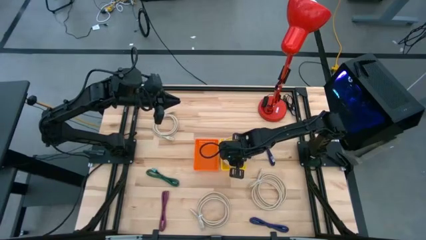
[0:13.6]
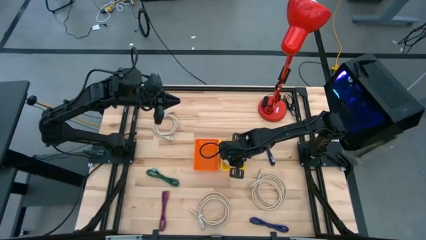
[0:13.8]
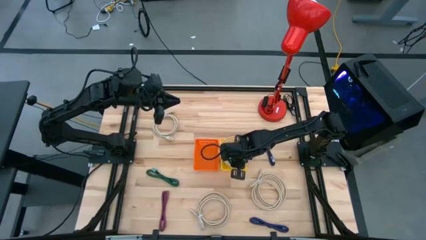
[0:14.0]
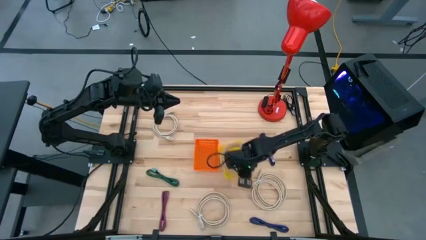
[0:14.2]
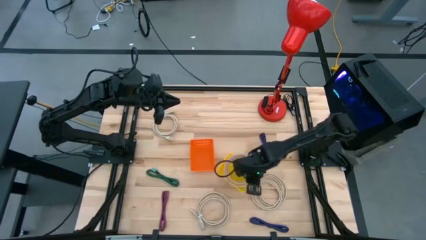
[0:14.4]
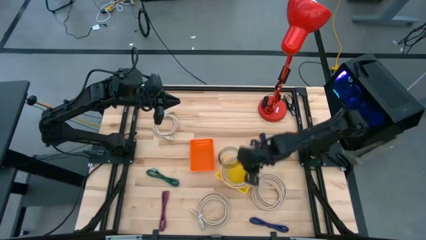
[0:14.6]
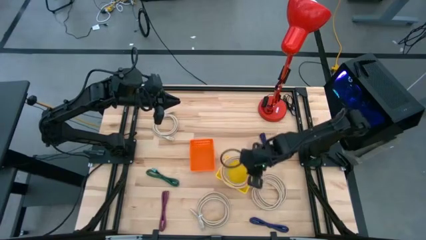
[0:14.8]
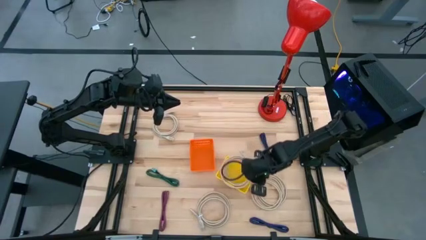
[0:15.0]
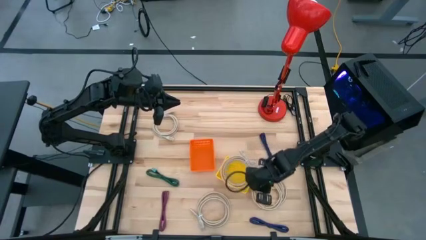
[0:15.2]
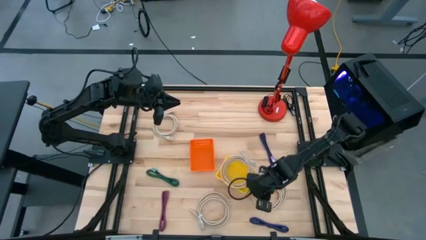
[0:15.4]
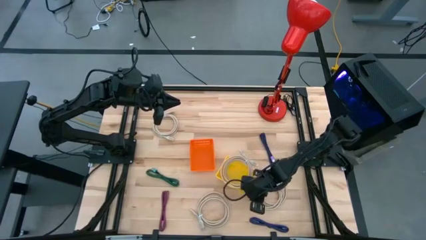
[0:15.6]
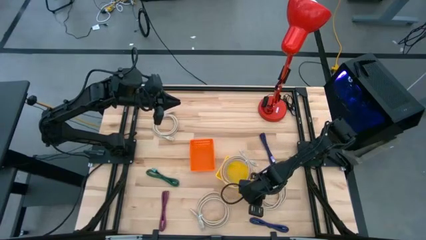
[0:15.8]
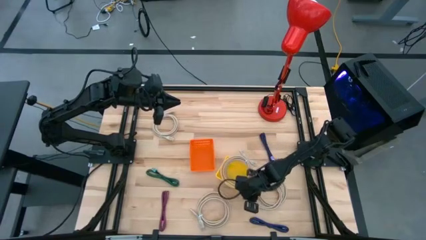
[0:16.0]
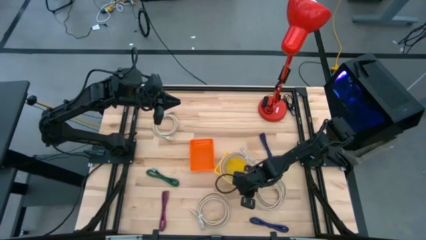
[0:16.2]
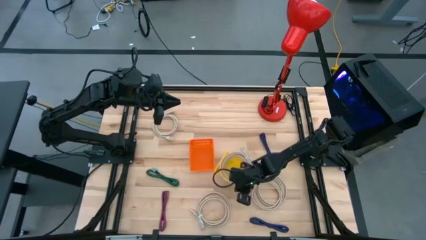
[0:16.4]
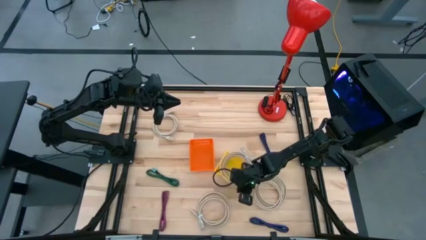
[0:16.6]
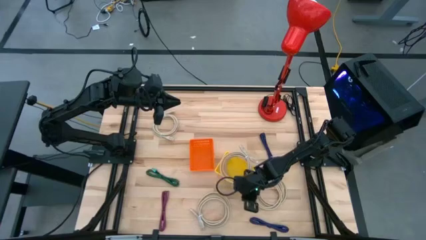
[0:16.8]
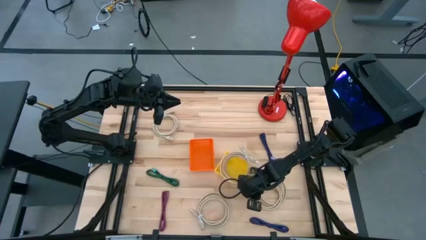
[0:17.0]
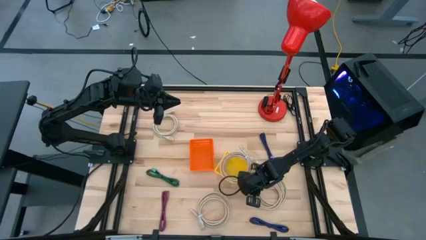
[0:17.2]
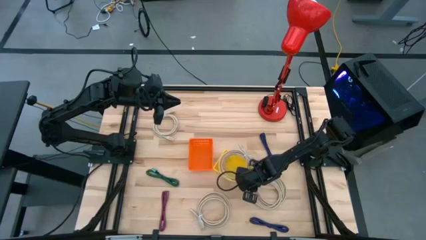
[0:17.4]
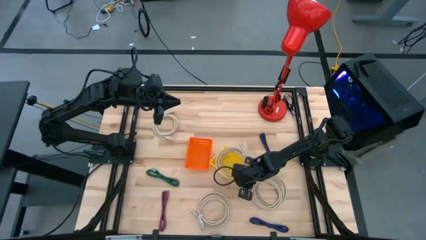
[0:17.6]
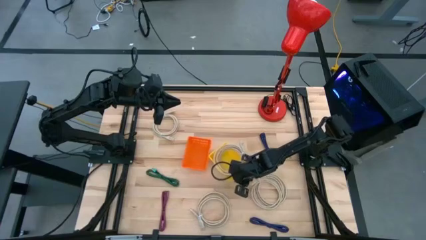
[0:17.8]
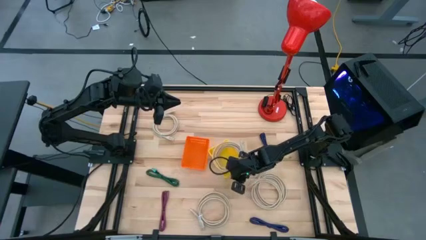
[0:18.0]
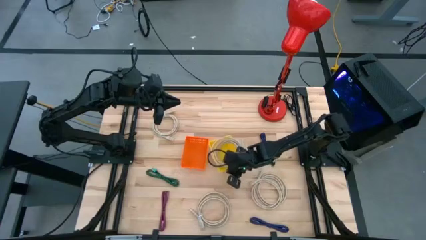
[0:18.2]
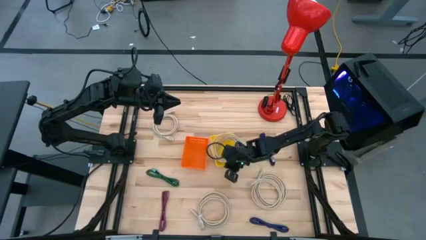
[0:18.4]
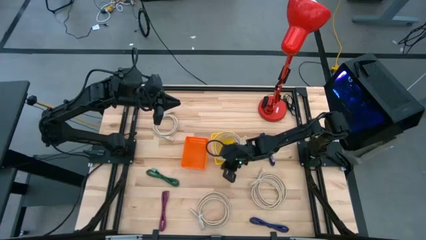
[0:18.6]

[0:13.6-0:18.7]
Task: Pick & Place USB Port
Adjust the yellow bin

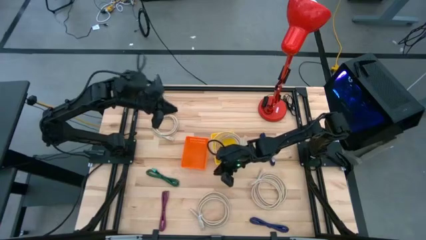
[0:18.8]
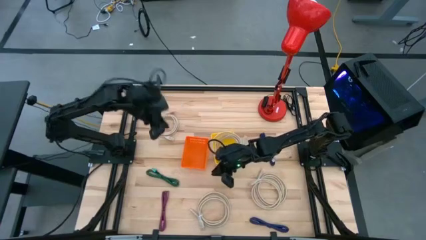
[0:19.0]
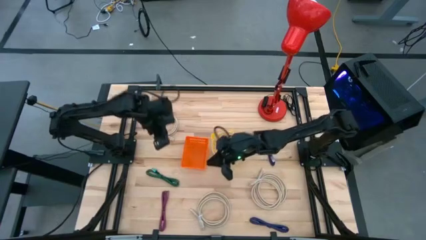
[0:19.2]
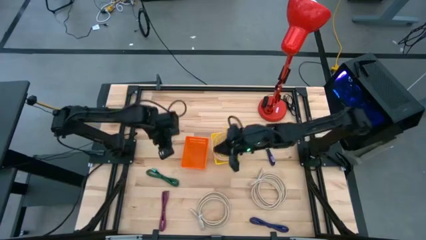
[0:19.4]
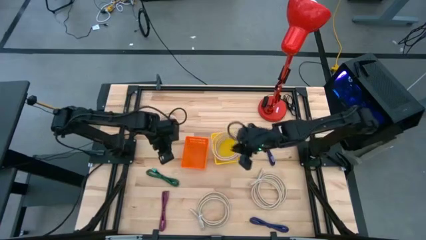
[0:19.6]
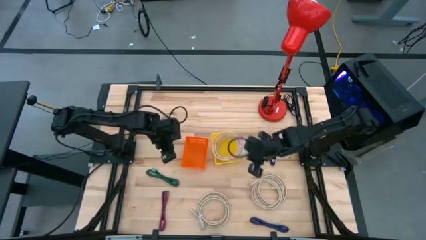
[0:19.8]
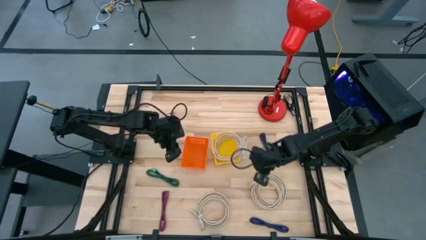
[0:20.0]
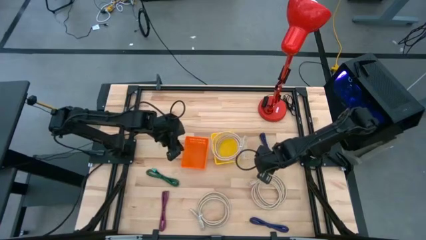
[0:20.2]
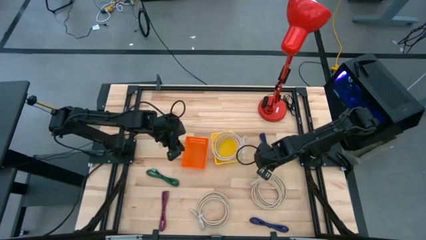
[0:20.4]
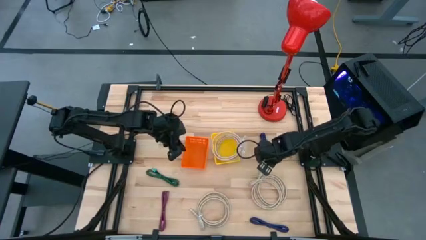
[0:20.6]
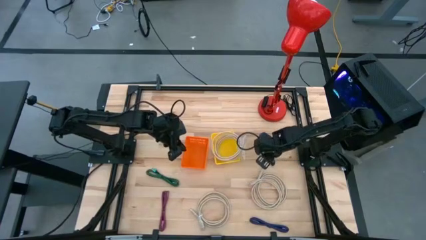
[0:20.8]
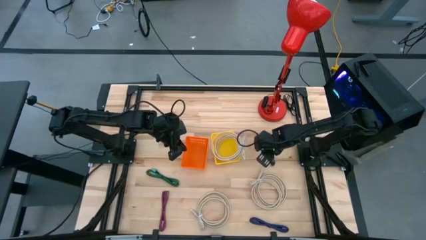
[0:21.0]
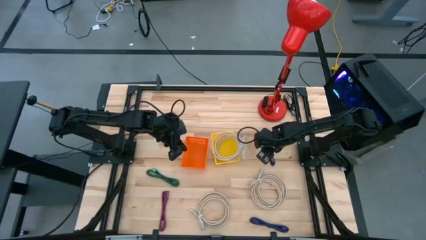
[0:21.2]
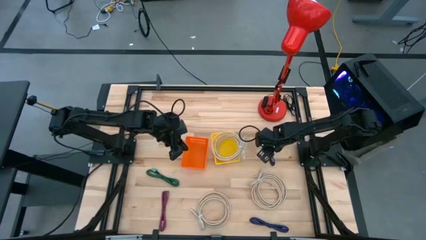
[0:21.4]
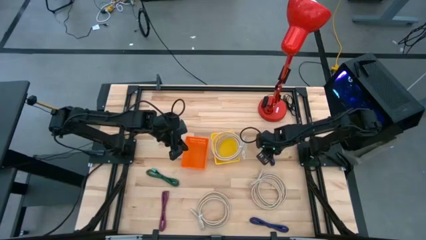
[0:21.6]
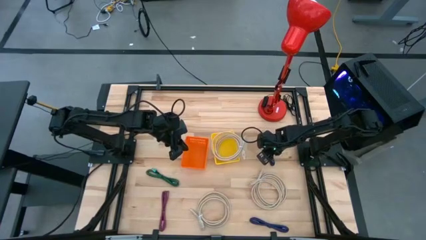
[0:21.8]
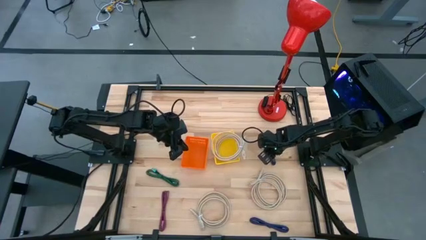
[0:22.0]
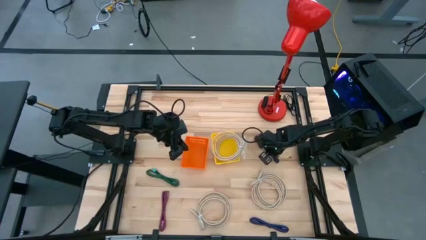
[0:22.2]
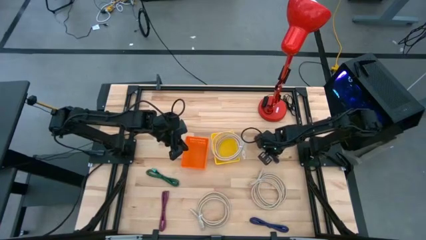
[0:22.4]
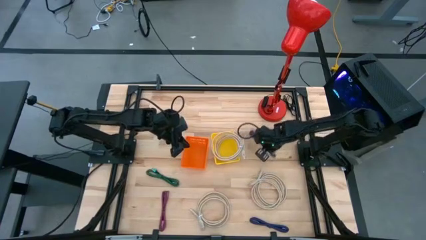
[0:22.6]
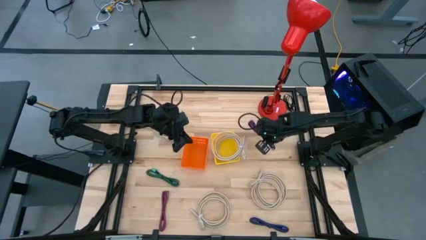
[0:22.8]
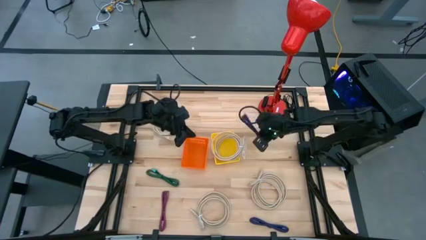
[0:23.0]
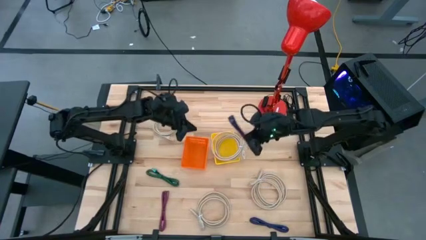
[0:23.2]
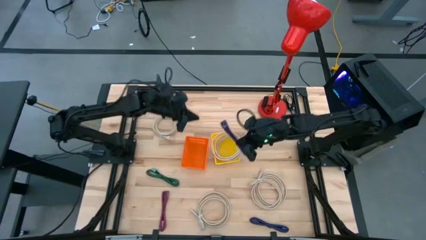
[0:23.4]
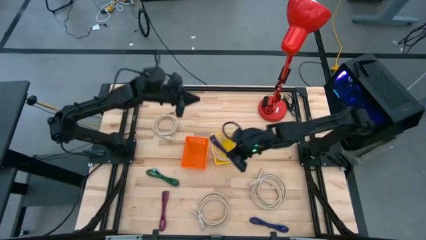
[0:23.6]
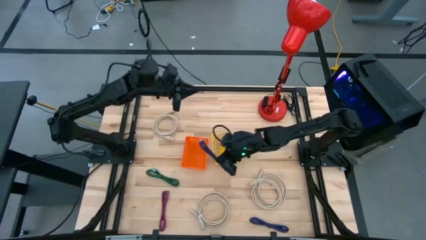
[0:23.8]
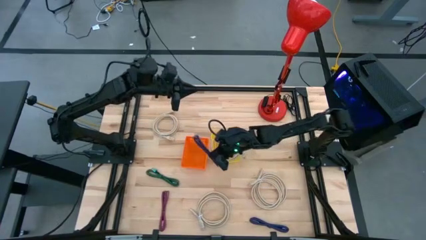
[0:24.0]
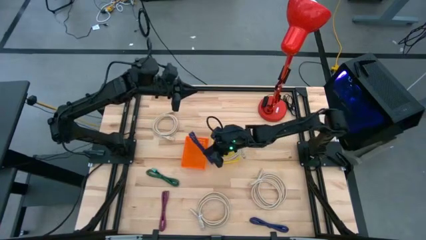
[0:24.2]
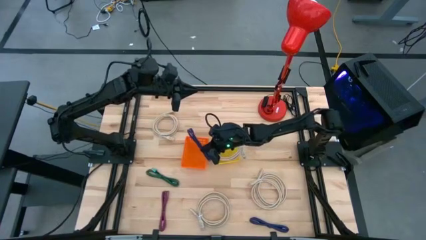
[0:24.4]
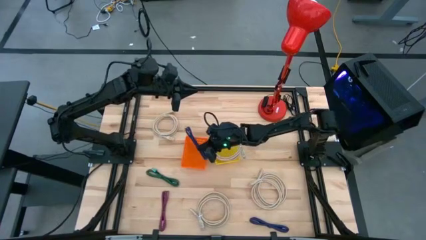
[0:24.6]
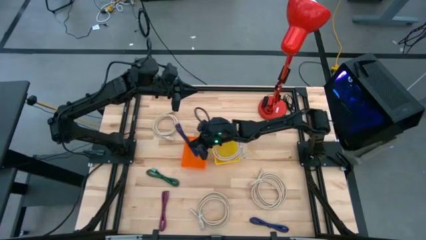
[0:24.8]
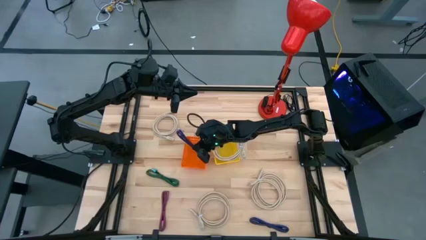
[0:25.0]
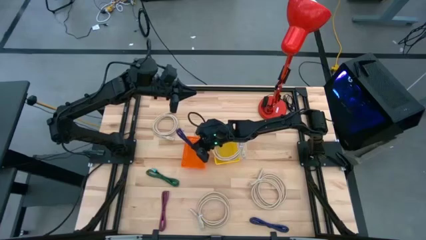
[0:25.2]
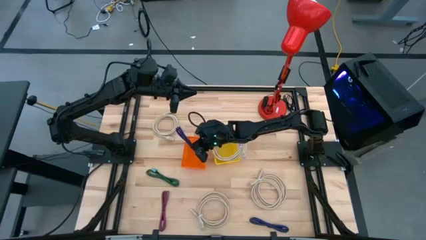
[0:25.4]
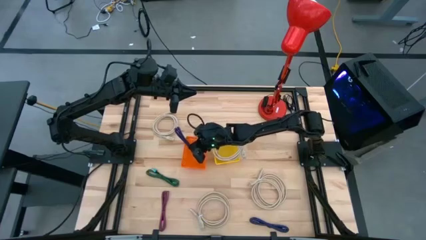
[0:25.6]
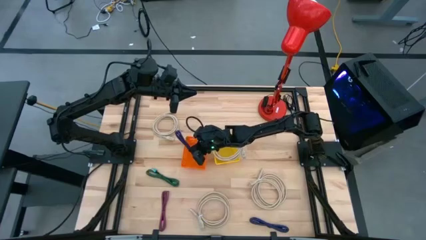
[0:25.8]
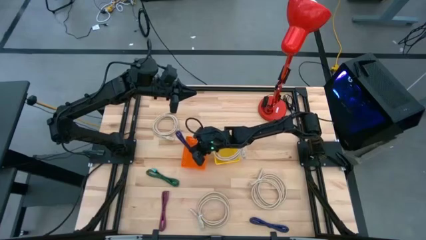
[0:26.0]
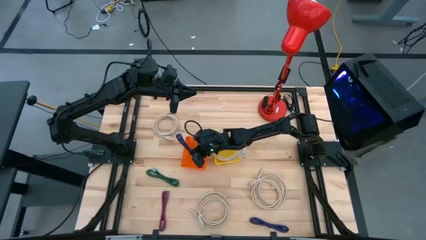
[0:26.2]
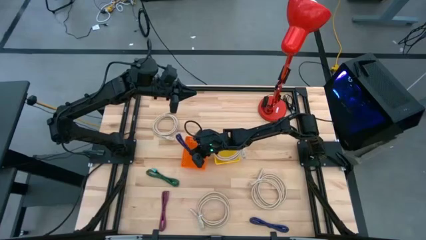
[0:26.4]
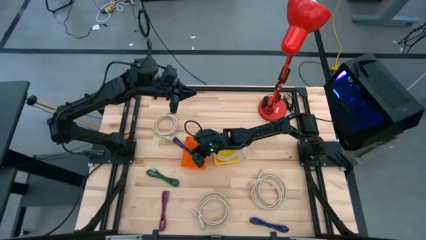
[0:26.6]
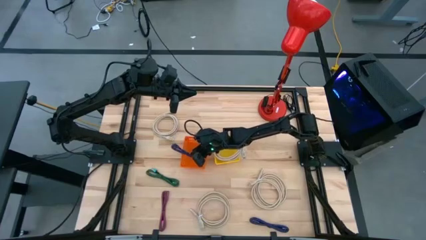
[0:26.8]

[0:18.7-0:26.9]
Put the black and blue USB cable into the orange bin

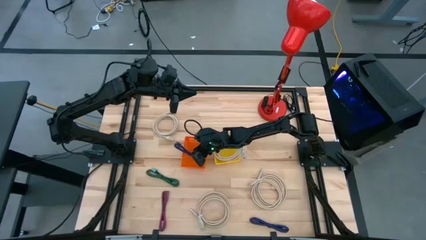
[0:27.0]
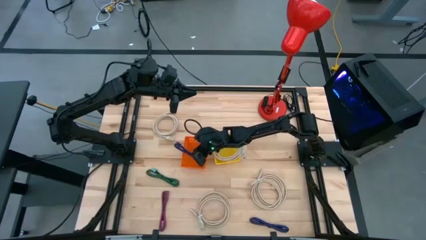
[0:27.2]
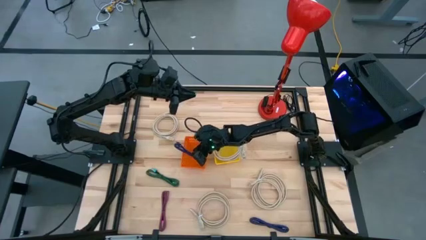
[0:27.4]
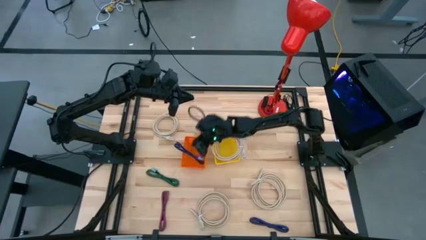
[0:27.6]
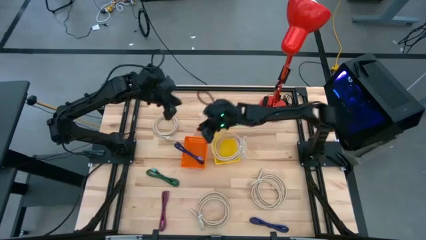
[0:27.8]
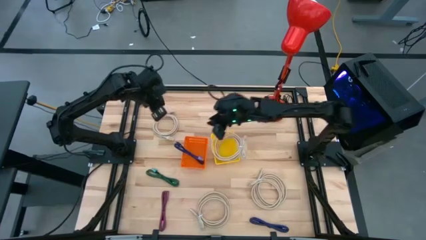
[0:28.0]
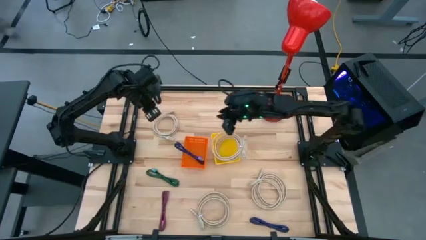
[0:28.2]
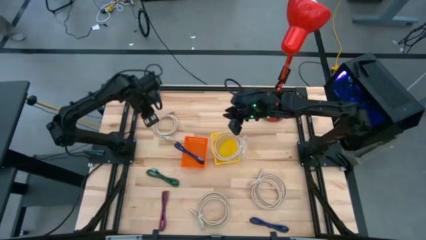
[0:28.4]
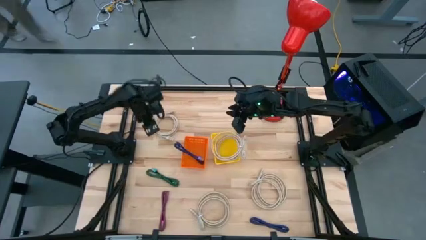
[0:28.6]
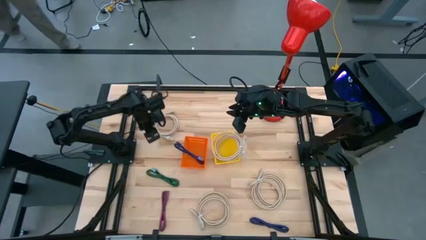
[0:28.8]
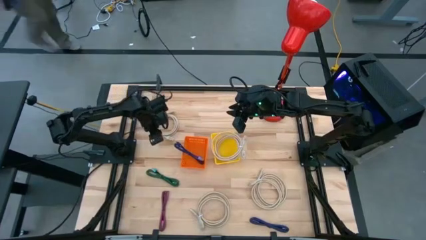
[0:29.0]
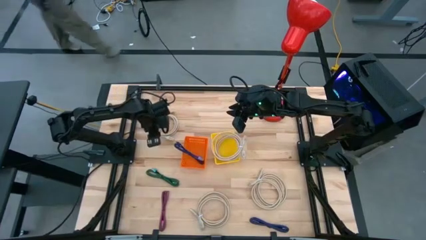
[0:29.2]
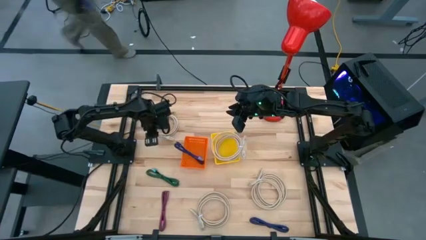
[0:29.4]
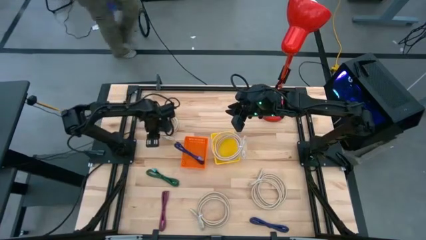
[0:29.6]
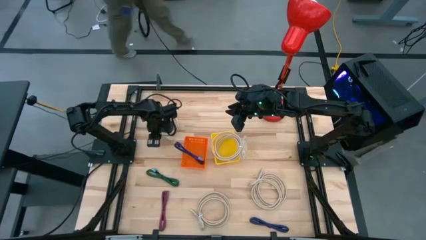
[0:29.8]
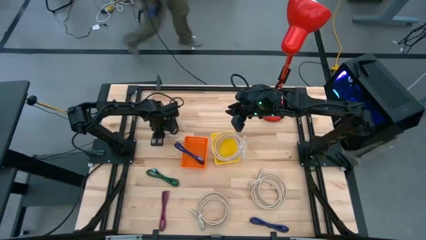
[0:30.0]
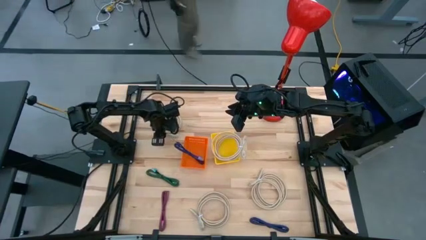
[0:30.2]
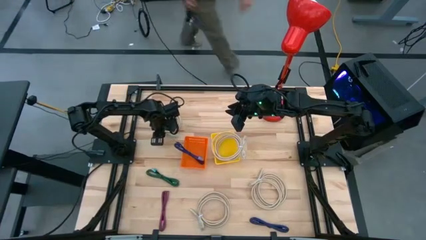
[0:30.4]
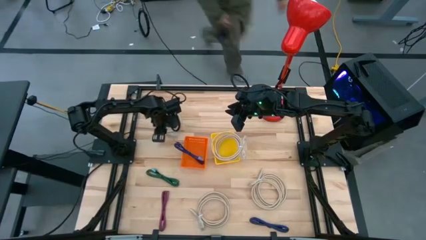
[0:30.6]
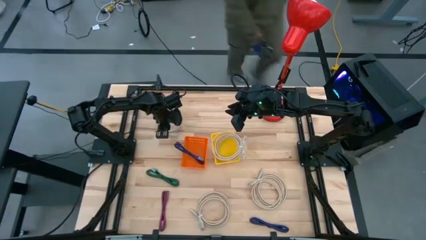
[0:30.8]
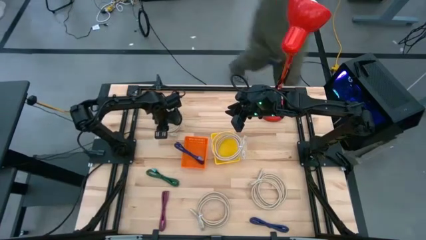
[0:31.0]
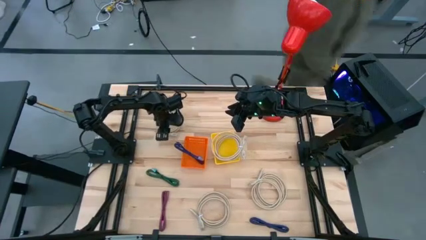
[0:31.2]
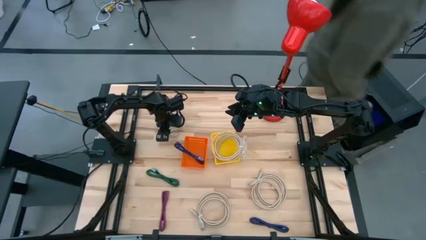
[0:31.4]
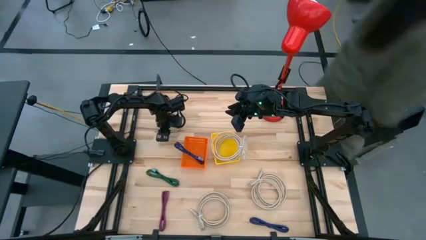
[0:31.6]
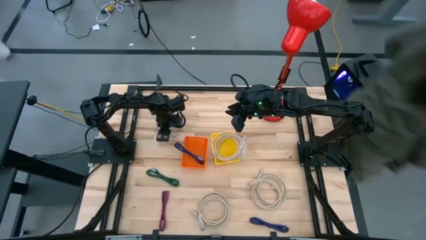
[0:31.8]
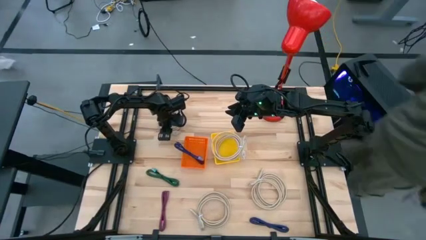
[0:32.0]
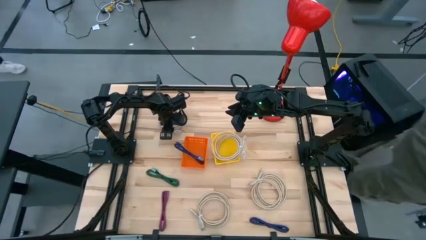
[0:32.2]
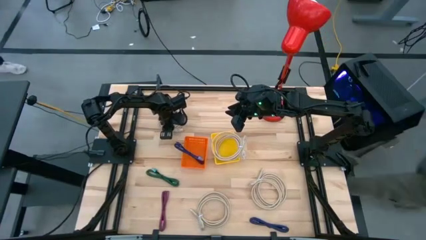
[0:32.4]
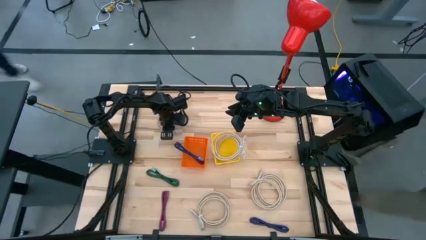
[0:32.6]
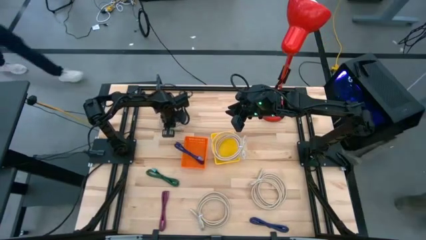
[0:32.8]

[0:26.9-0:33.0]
Put the brown HDMI cable into the yellow bin
